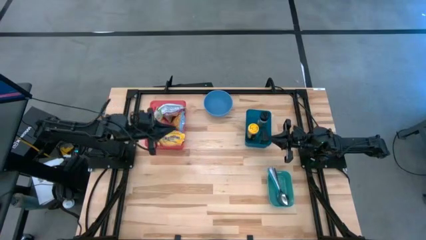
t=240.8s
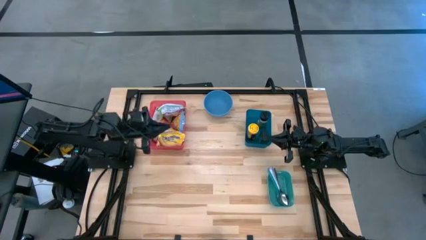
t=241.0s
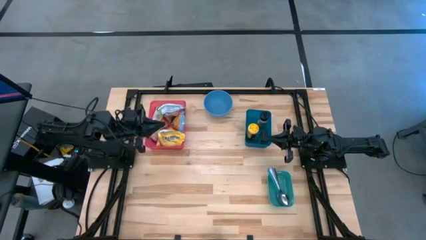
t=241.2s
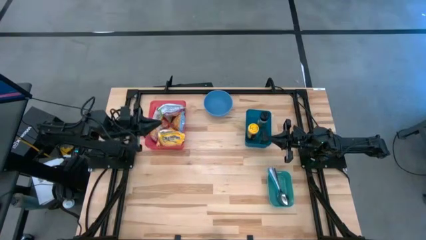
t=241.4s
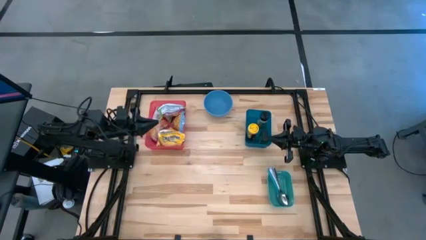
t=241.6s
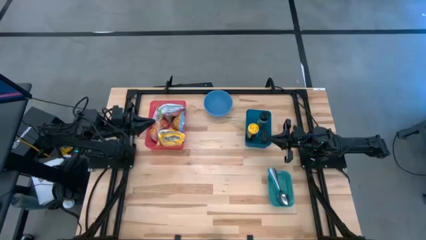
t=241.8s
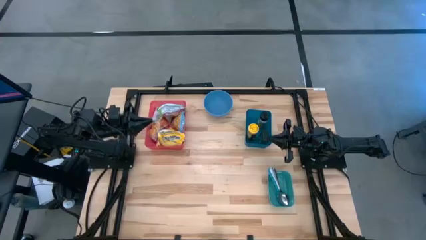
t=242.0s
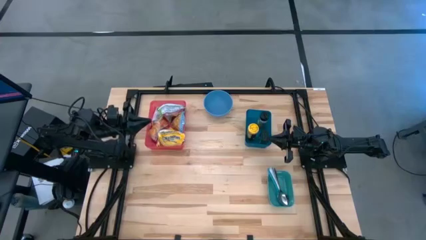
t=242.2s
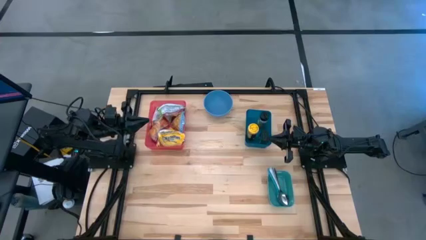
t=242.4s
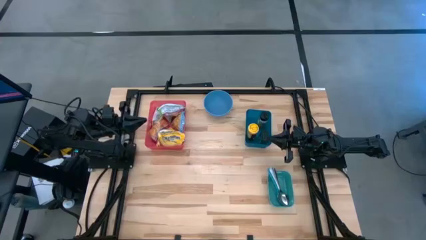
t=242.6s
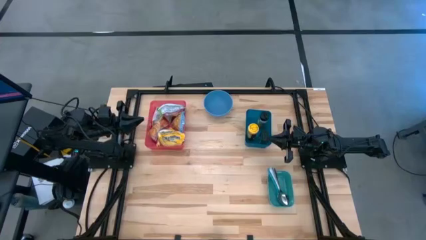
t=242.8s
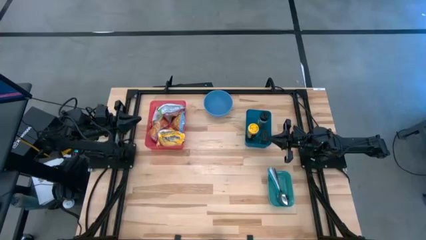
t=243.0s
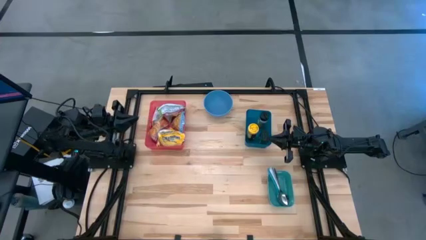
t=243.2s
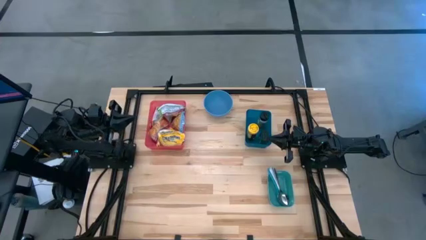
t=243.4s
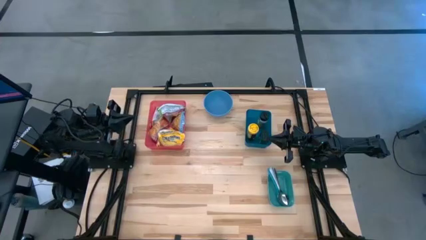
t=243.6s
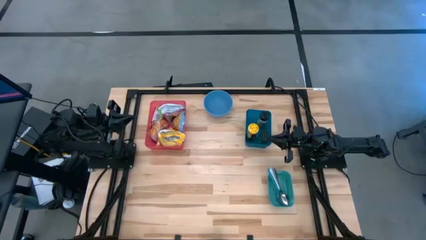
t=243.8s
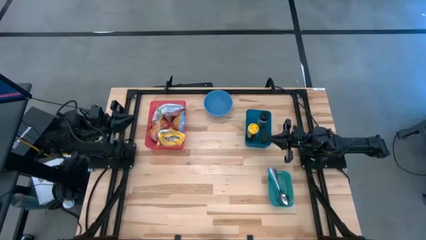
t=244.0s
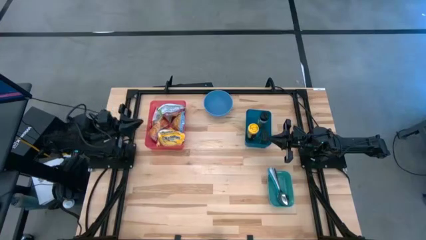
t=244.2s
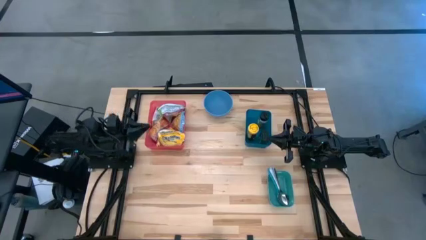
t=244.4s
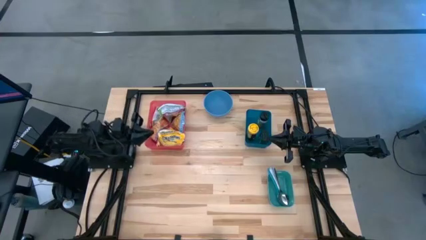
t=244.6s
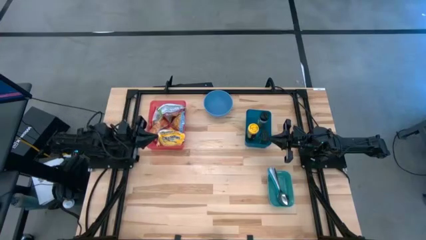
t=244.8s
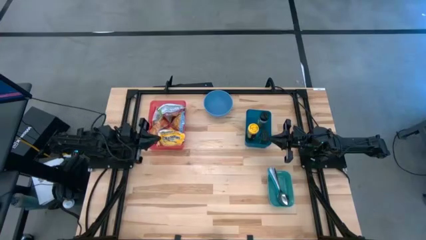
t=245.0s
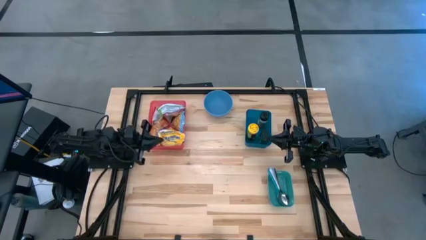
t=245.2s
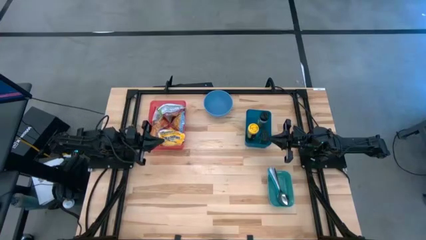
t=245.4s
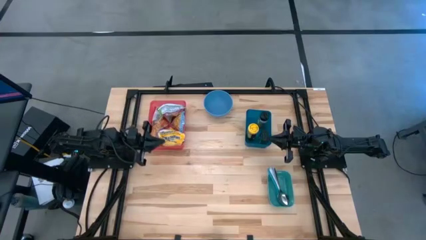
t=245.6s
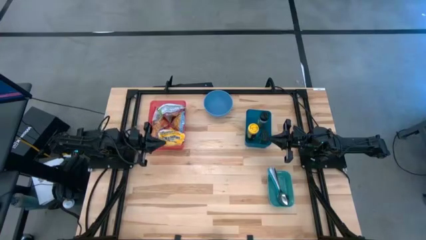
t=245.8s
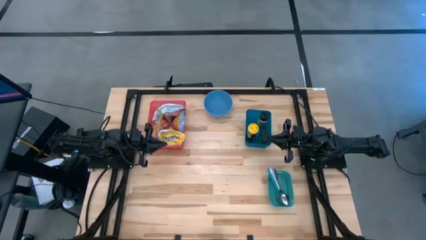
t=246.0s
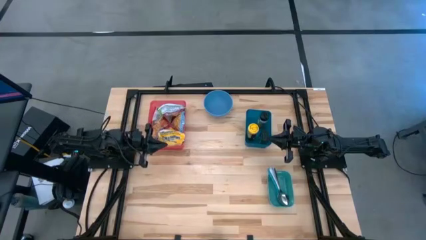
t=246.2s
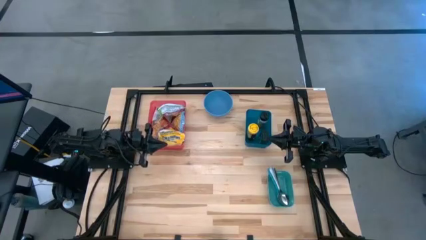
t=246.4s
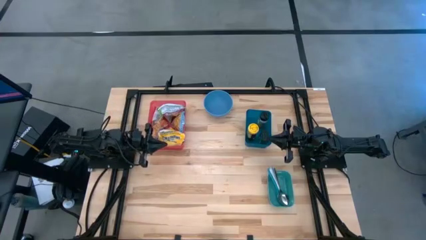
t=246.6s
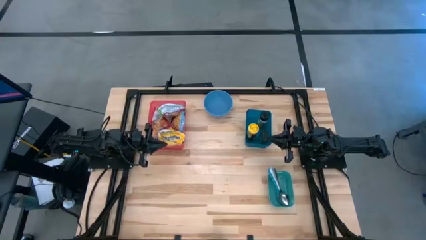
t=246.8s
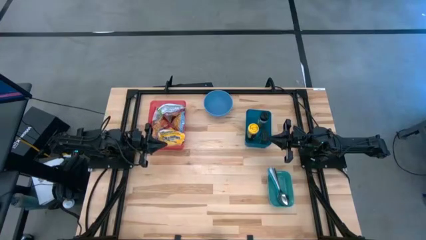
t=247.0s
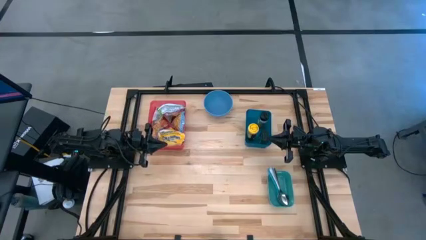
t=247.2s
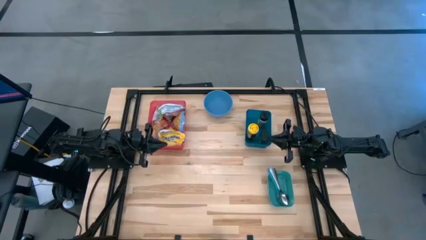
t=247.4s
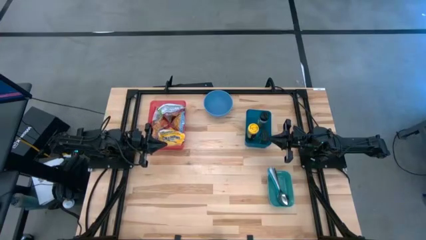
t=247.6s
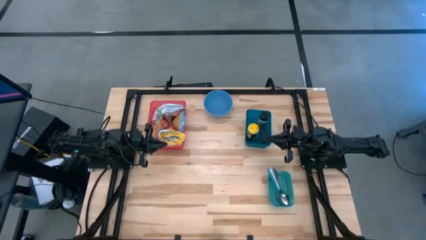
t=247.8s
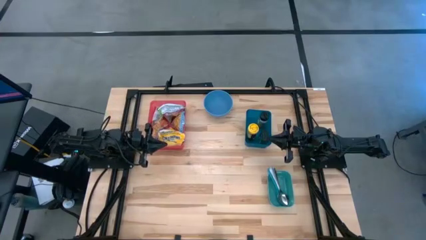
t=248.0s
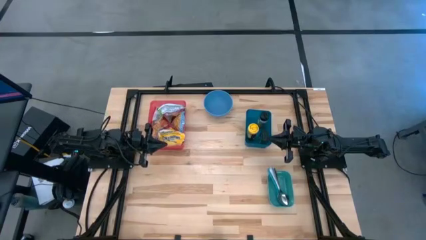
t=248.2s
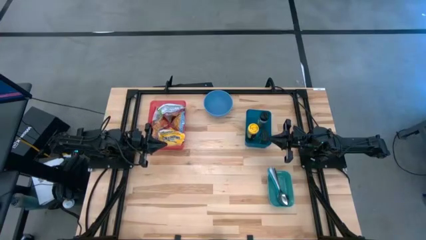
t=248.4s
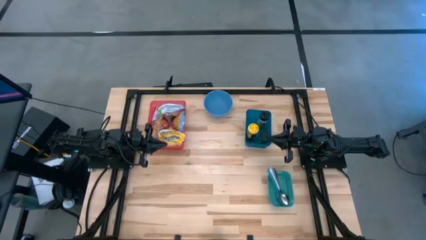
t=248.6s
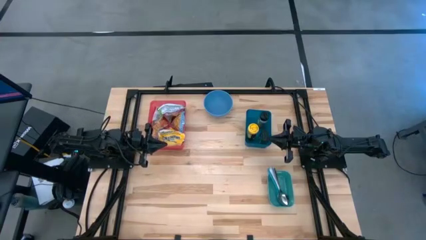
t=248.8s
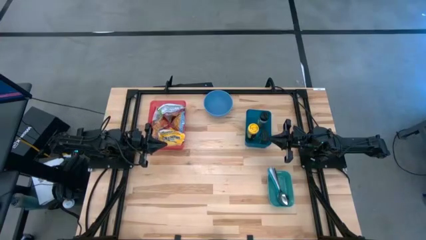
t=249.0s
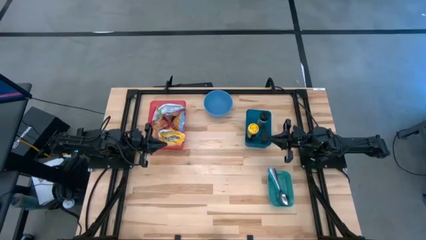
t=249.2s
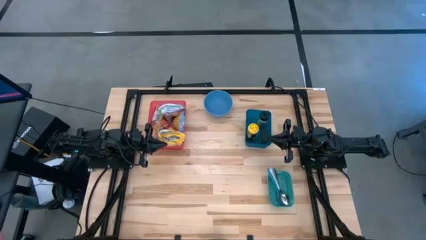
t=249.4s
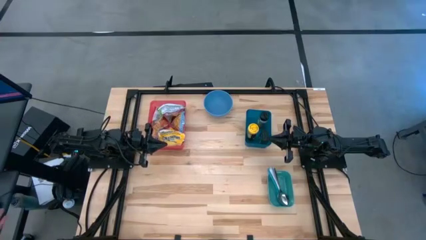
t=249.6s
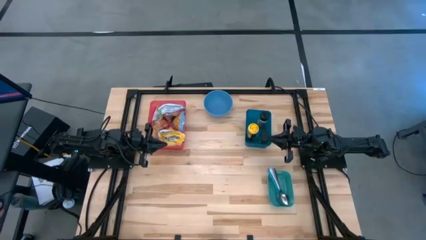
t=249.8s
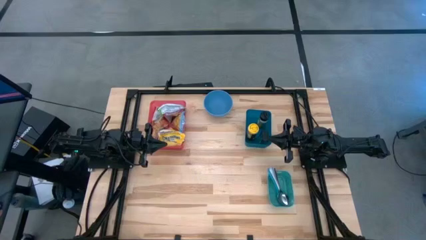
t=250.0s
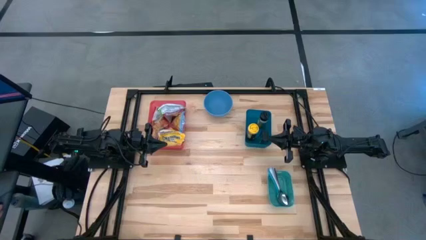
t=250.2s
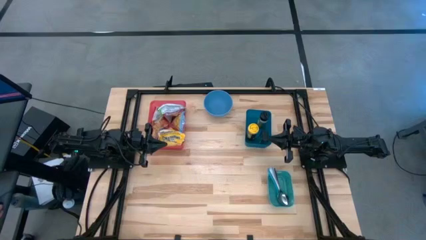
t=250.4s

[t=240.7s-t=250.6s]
Task: Pick & Place Food Item
Return to Home Position

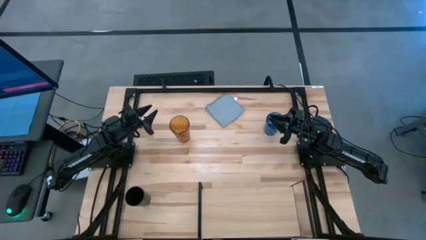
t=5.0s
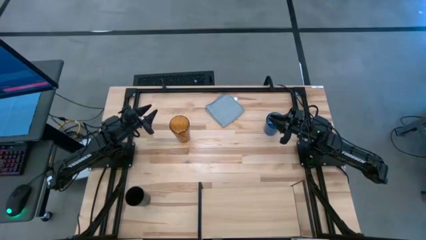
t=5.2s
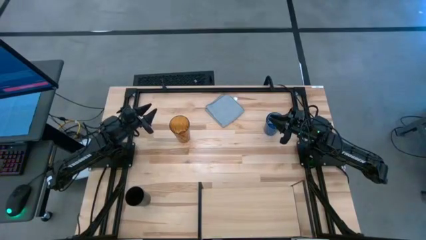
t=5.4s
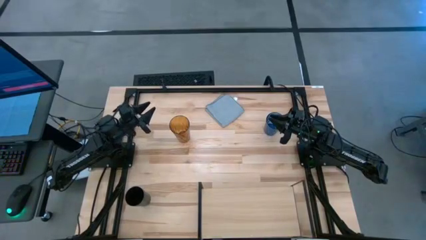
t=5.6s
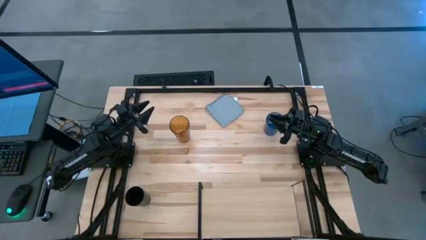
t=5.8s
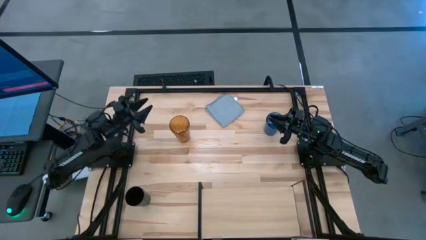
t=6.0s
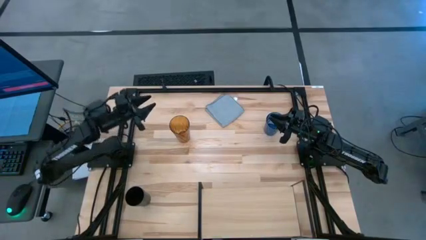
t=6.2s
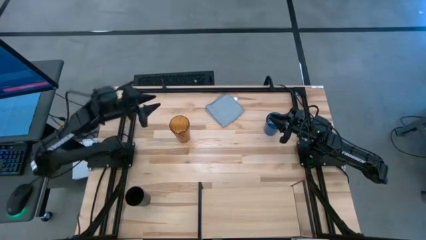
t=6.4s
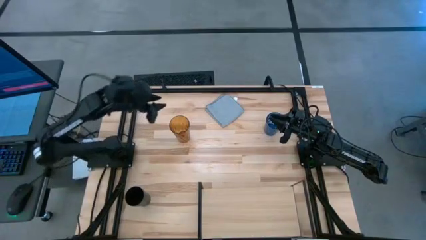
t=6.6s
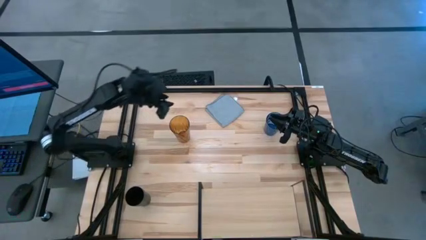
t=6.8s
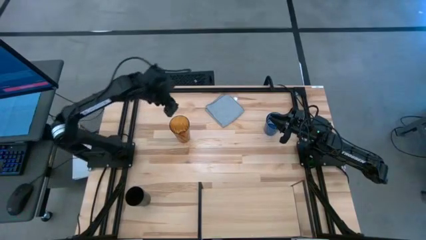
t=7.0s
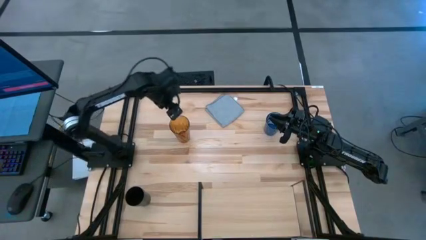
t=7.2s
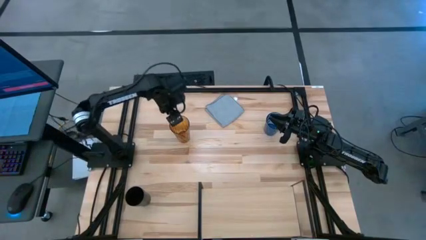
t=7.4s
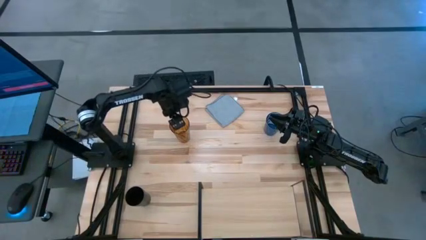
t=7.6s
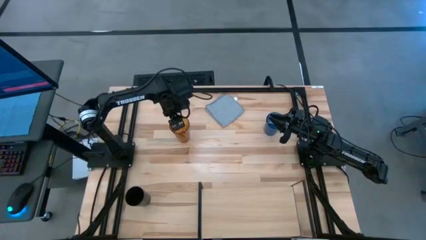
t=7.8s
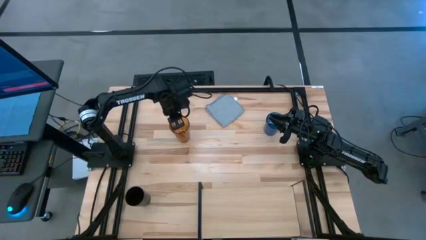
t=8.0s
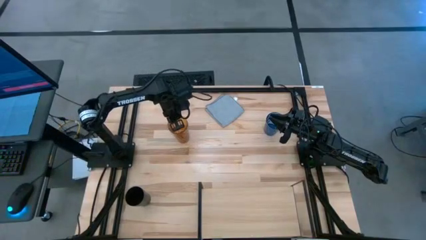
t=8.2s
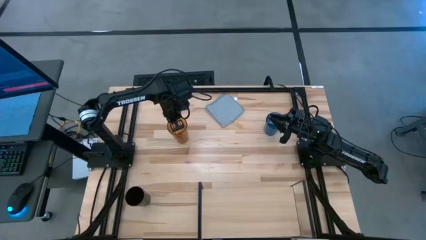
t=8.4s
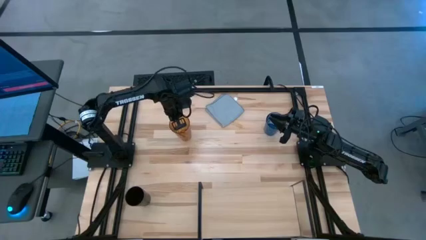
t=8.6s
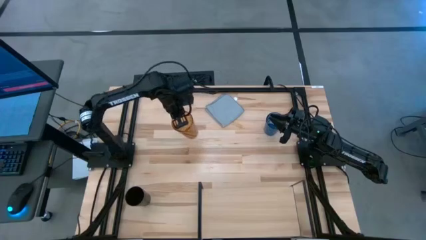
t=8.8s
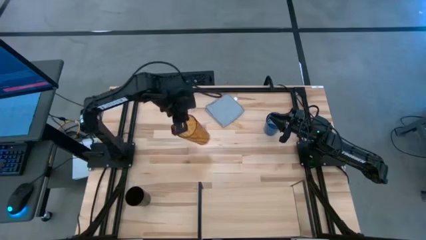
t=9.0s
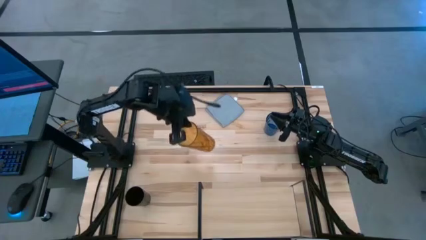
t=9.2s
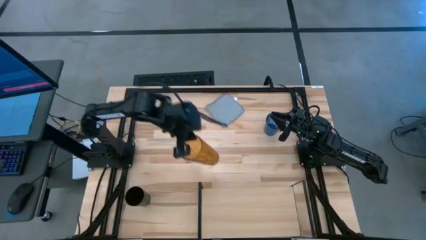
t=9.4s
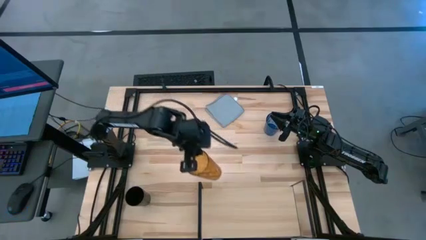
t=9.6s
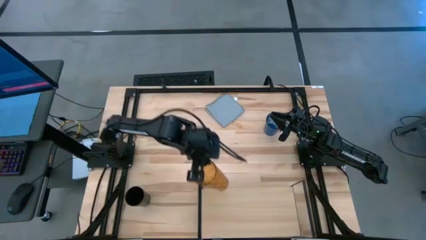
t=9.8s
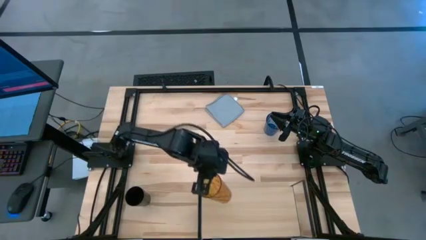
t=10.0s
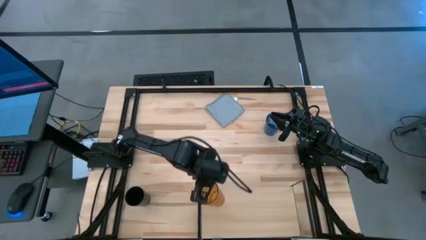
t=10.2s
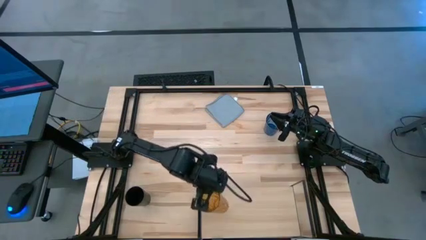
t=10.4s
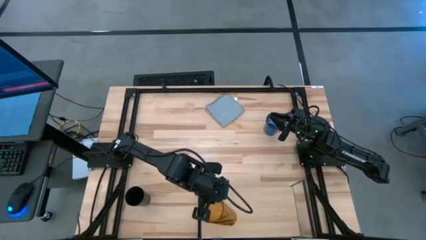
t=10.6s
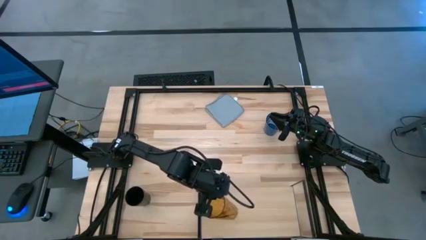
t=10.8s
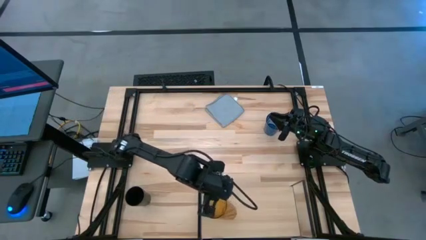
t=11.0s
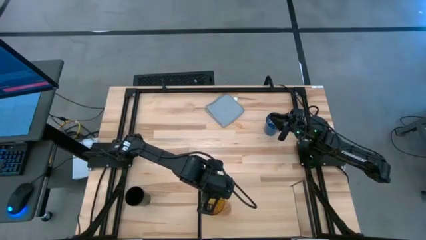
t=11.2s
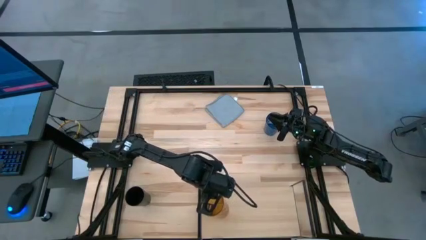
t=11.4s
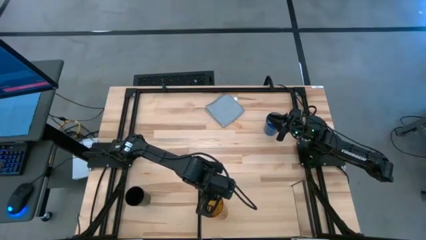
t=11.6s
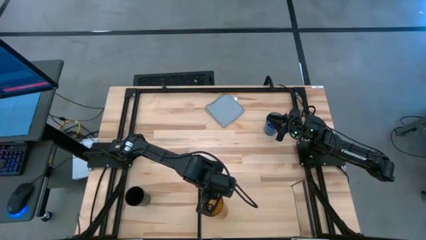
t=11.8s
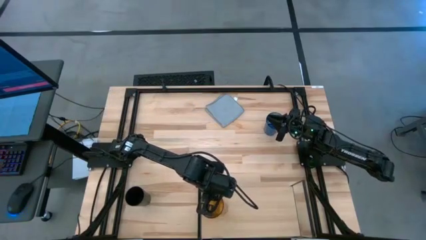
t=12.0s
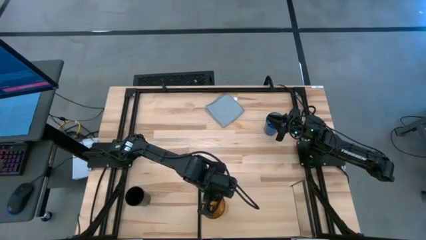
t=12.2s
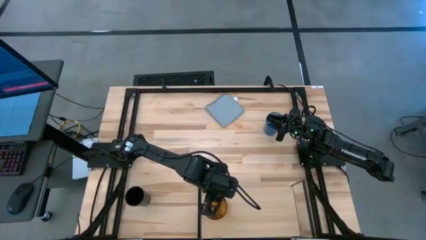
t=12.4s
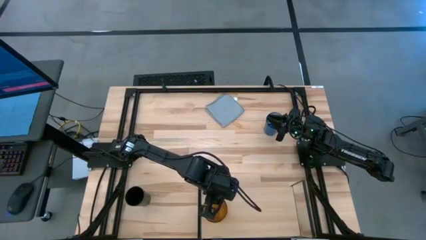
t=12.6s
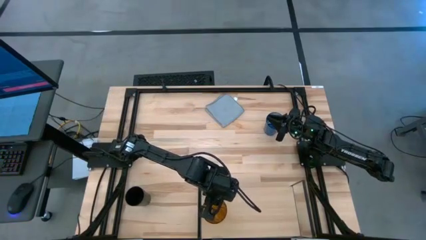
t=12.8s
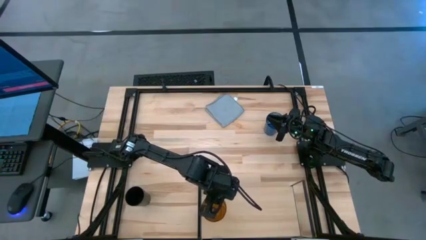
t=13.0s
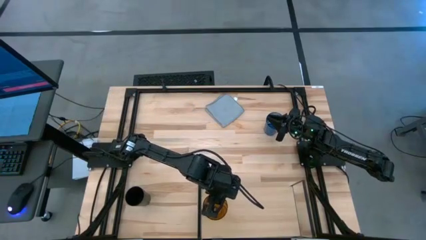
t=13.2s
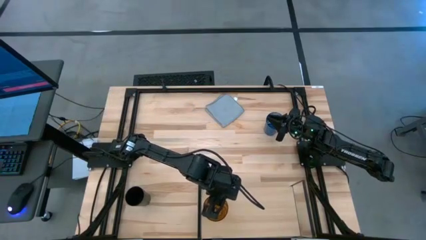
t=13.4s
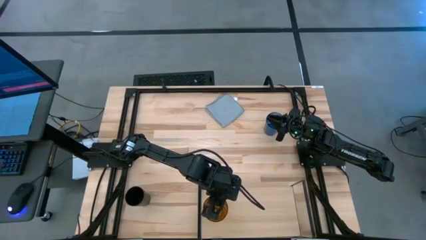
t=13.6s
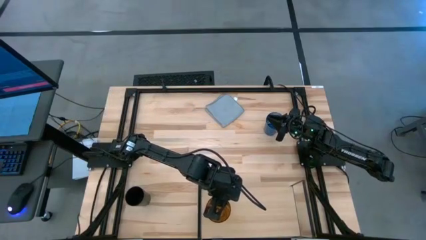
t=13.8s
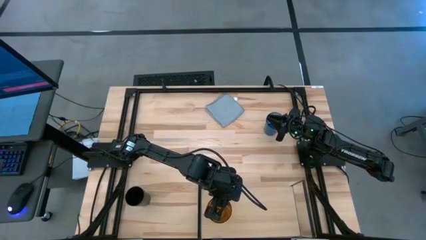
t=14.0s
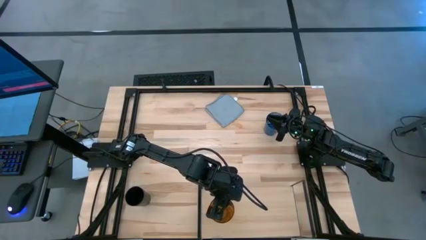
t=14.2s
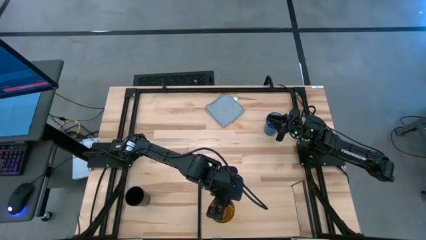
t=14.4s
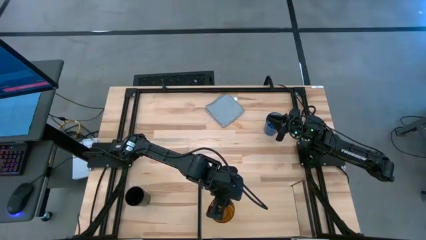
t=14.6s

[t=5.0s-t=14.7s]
Task: Stack small to large cups/mugs on shelf
Put the brown cup on the shelf
